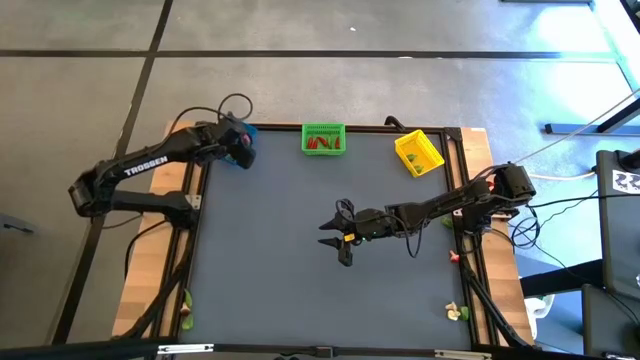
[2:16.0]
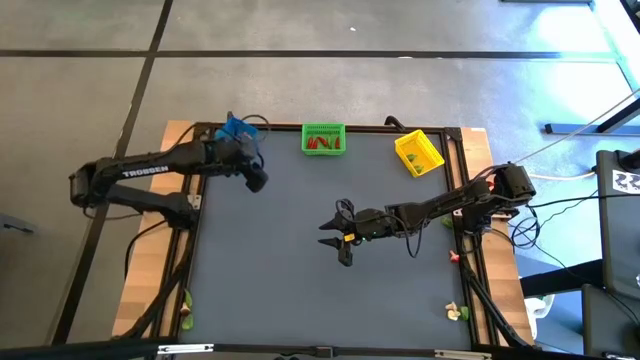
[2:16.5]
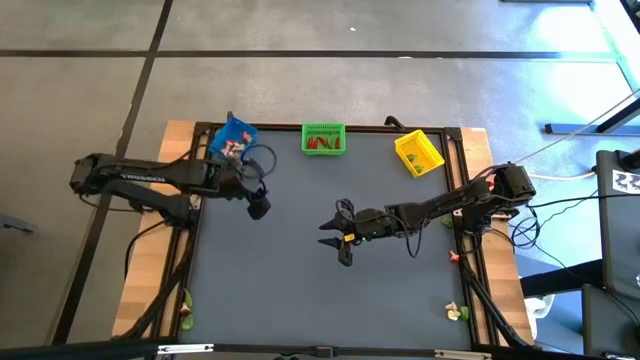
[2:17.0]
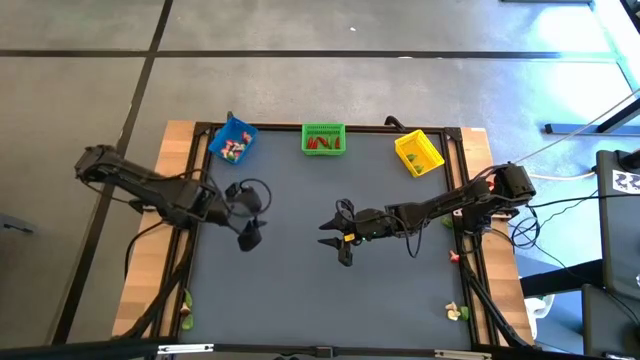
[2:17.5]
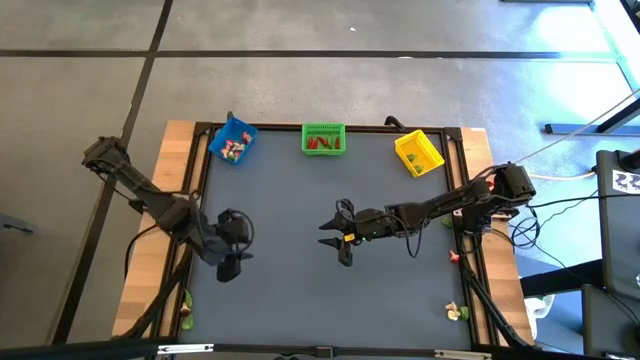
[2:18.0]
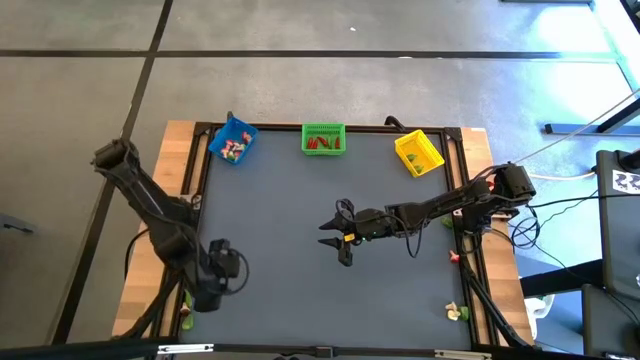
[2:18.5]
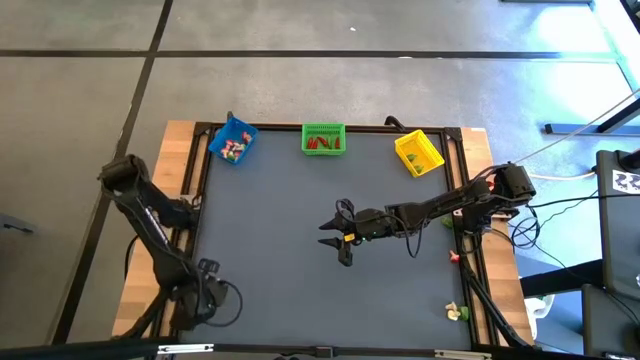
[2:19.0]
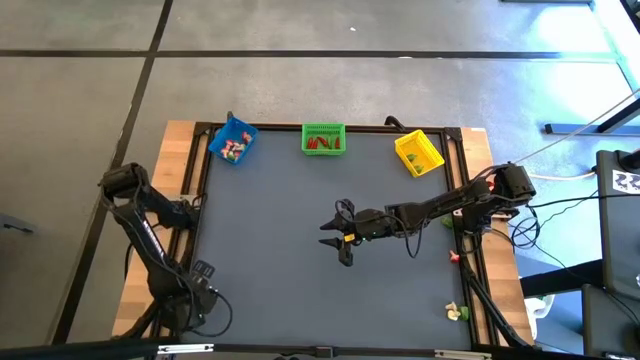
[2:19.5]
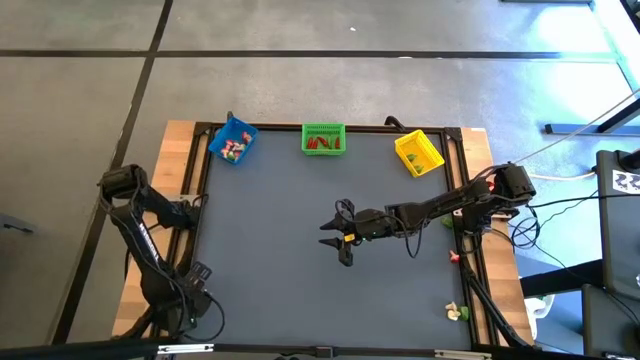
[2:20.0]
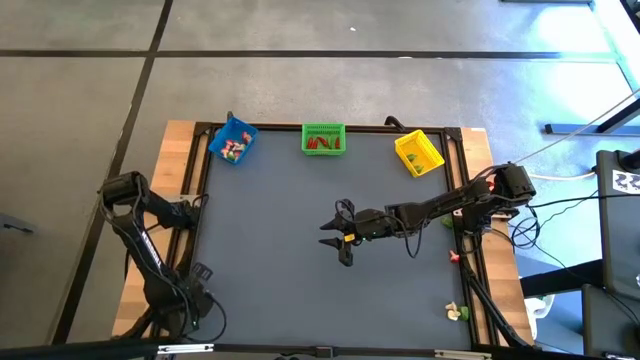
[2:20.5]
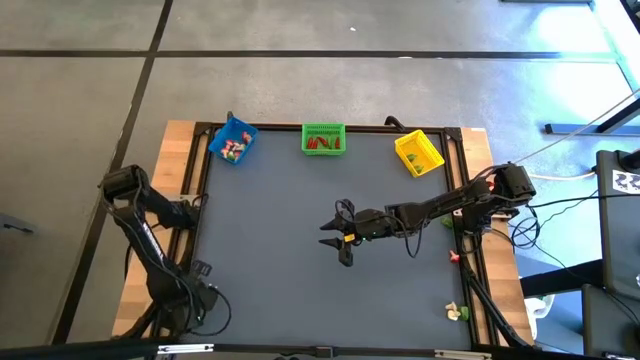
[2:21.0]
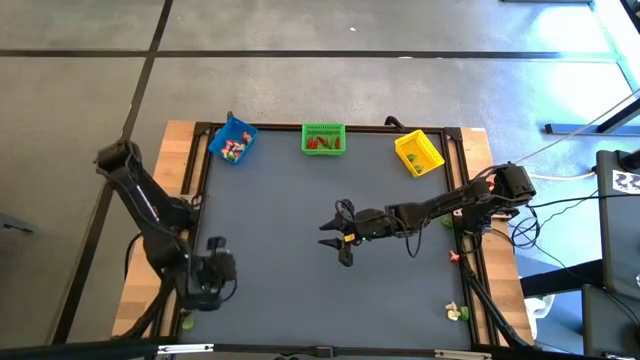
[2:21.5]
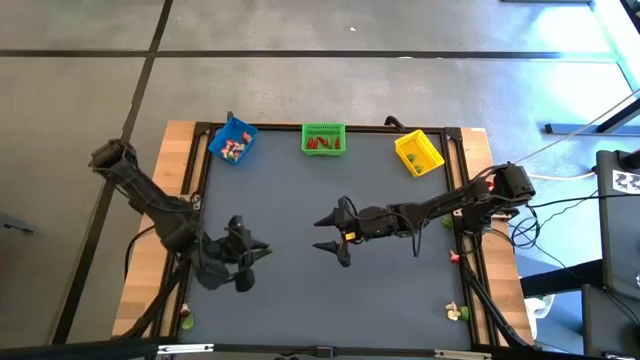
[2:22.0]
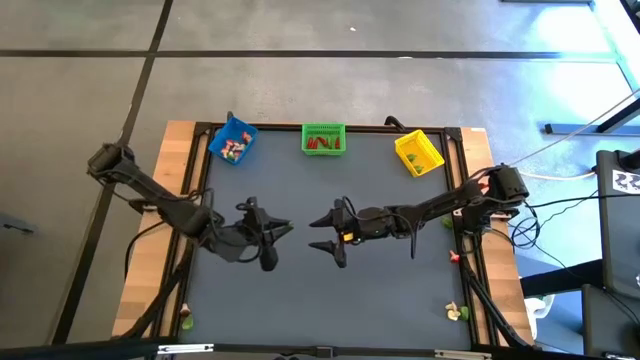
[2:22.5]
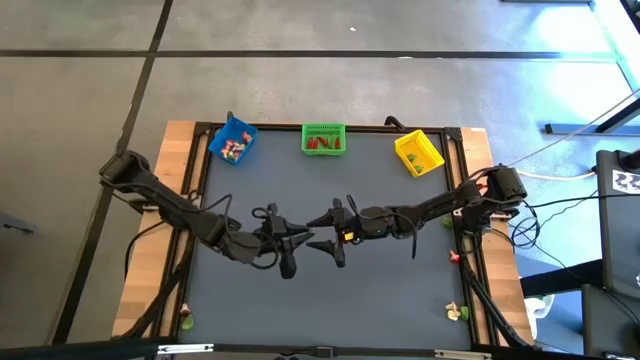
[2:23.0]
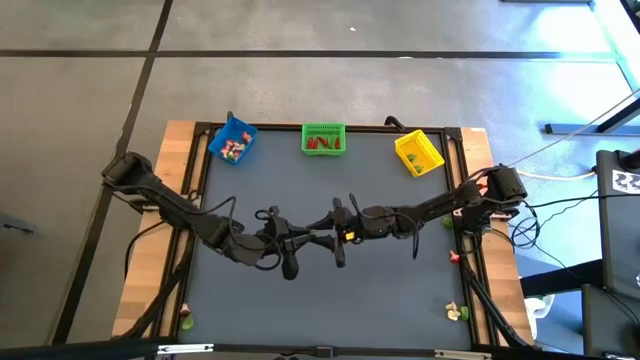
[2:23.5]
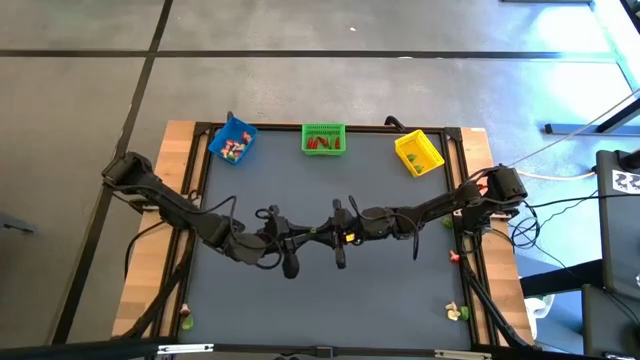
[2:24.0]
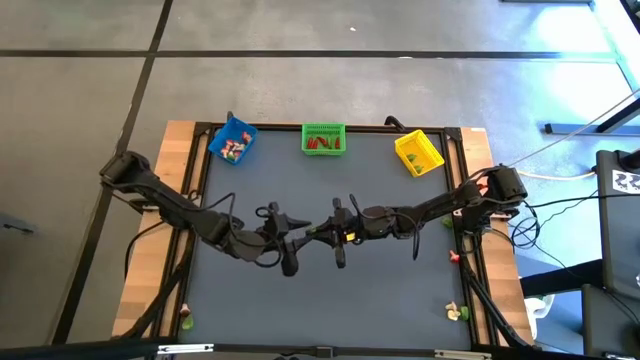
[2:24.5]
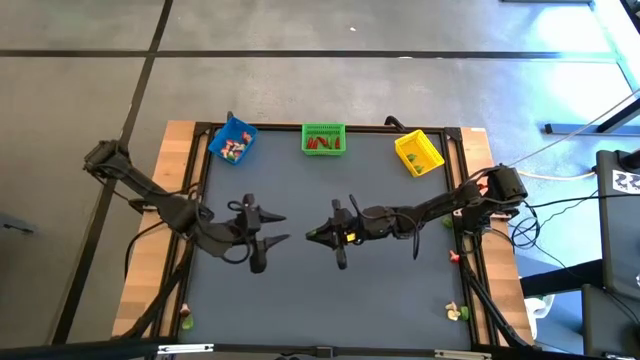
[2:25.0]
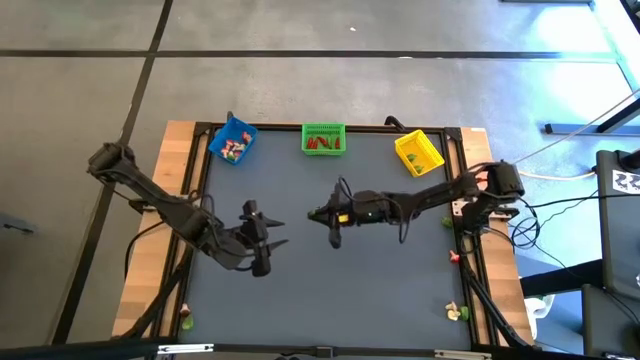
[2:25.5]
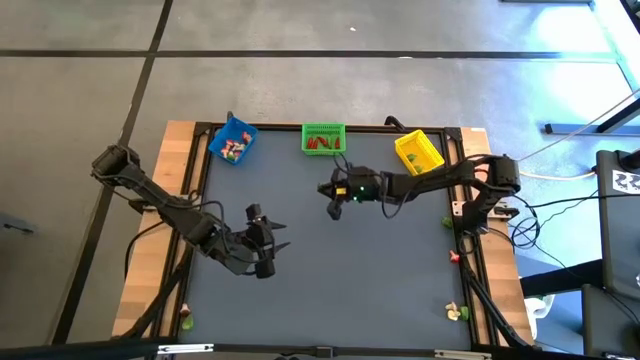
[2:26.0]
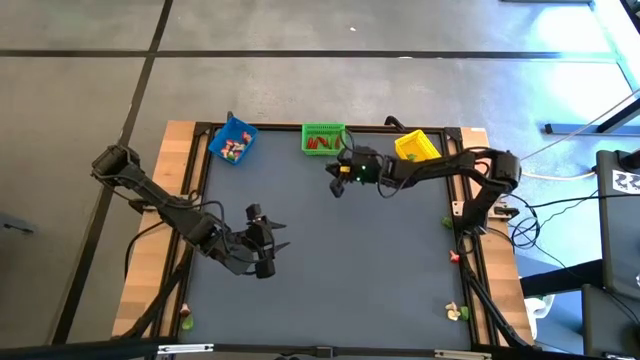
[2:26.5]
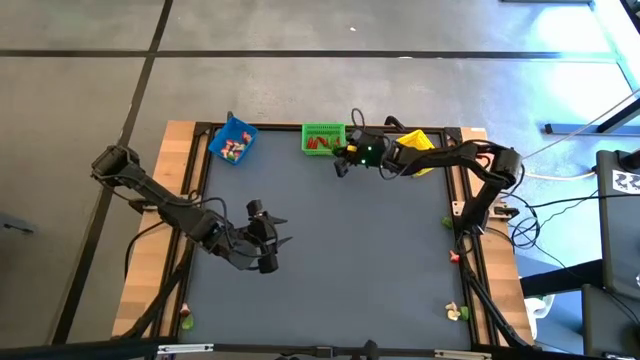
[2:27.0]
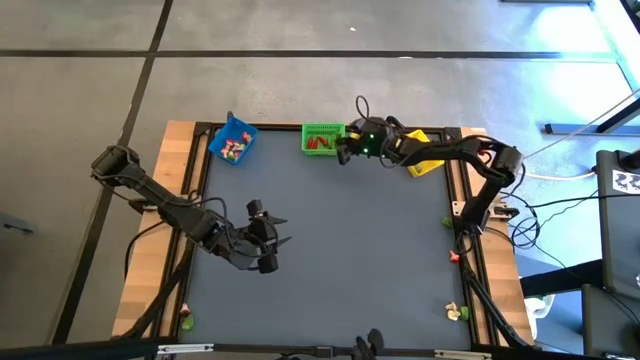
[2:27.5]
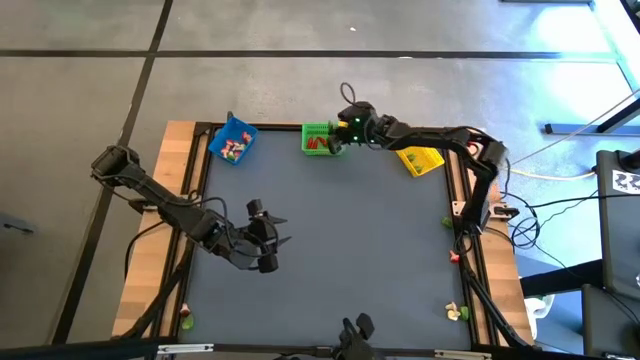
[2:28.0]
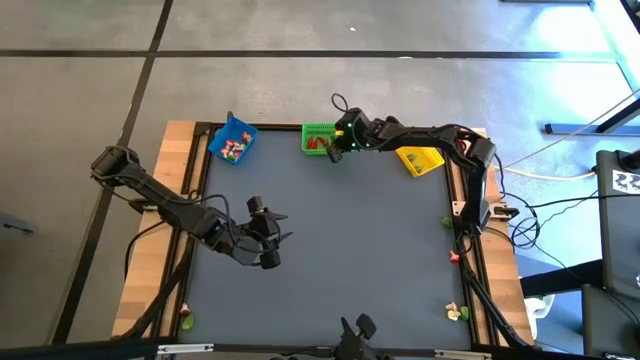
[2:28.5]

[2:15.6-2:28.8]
Task: Sort produce into baskets
Put the green chili pepper into the green bin

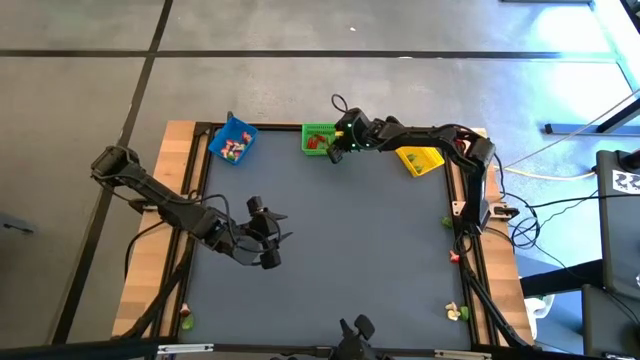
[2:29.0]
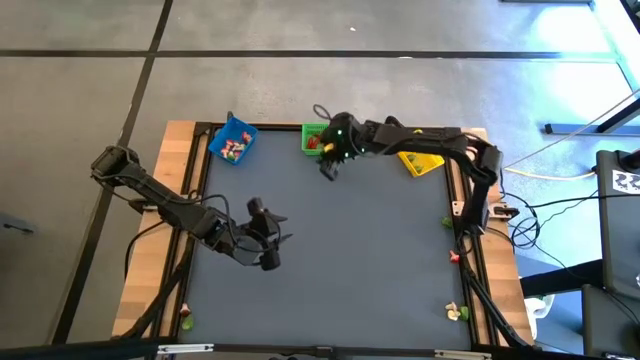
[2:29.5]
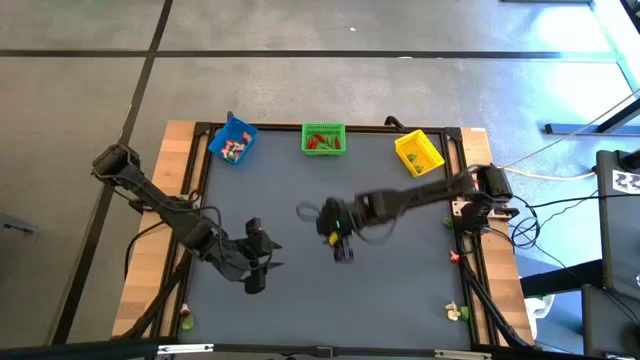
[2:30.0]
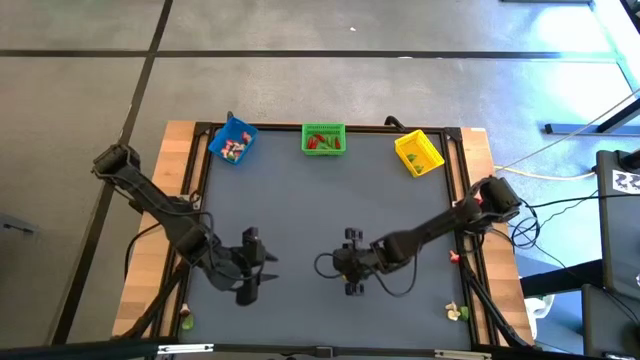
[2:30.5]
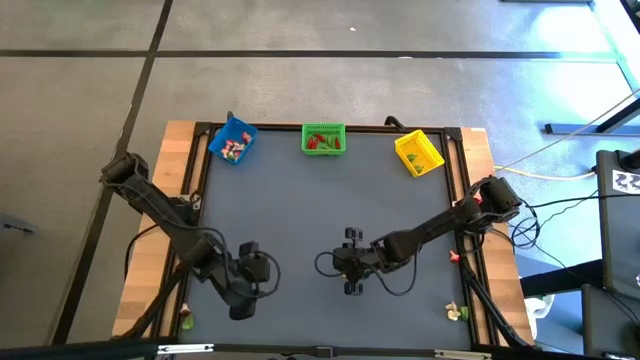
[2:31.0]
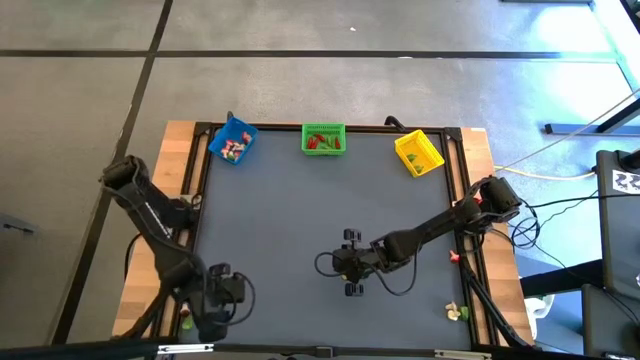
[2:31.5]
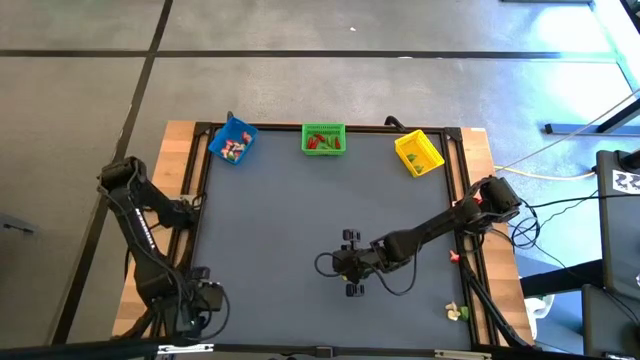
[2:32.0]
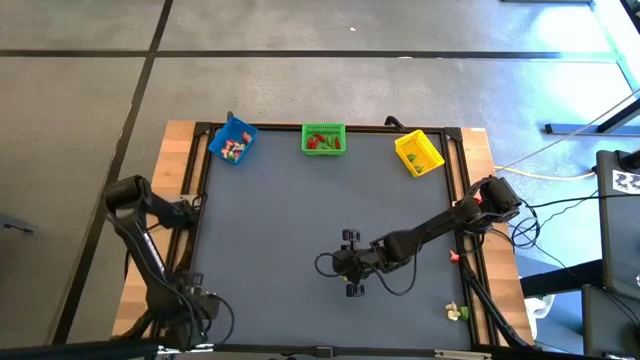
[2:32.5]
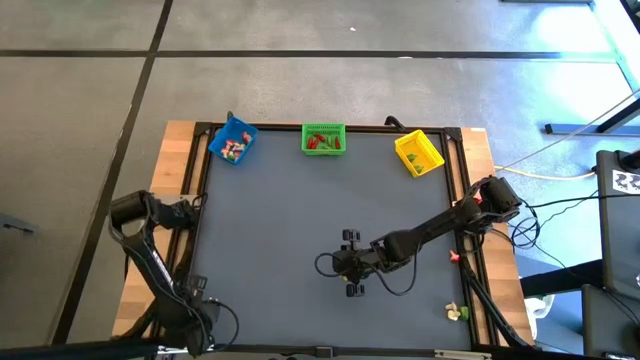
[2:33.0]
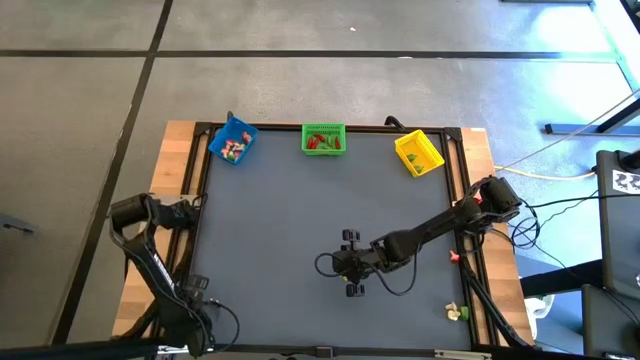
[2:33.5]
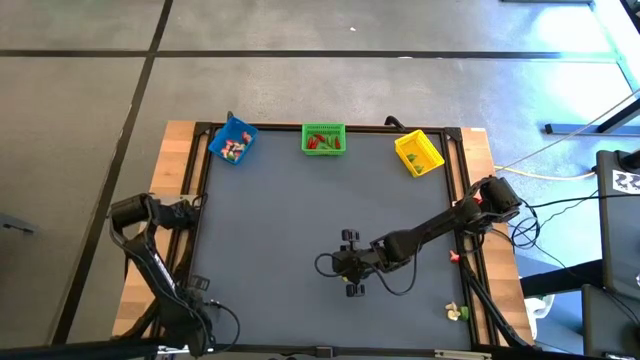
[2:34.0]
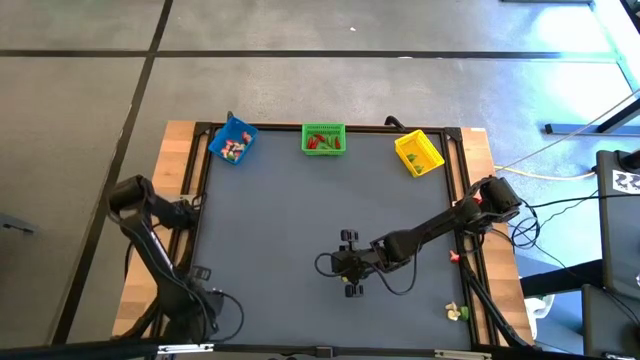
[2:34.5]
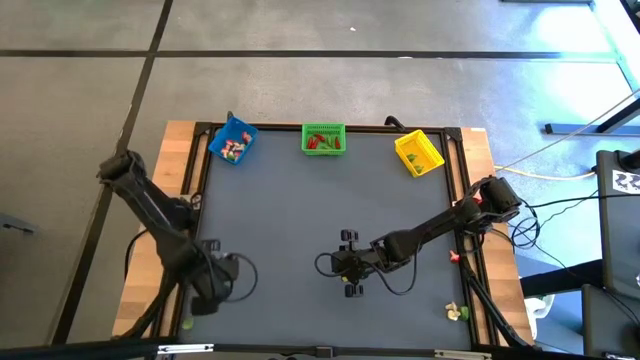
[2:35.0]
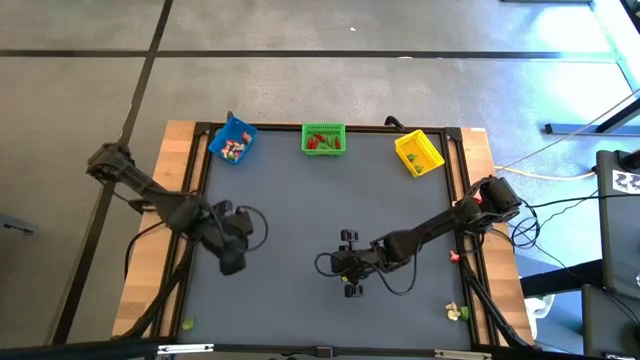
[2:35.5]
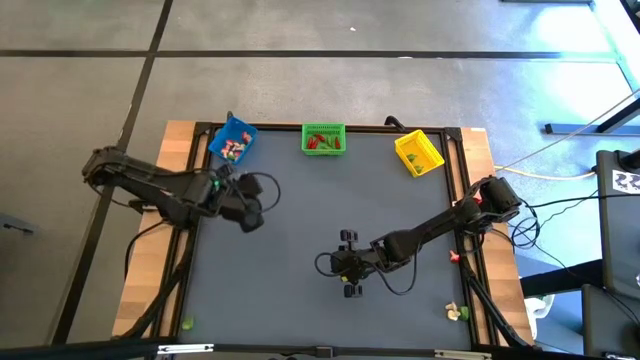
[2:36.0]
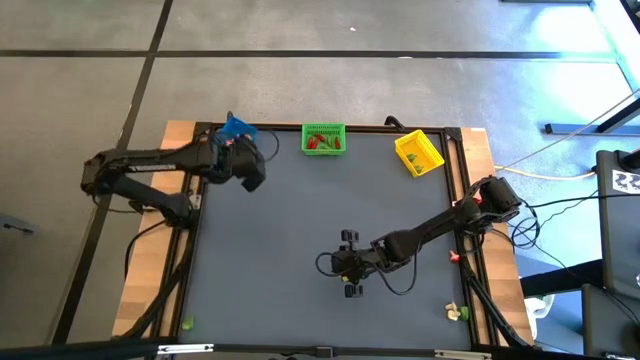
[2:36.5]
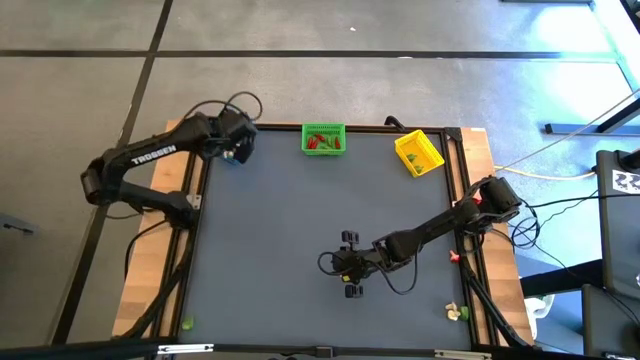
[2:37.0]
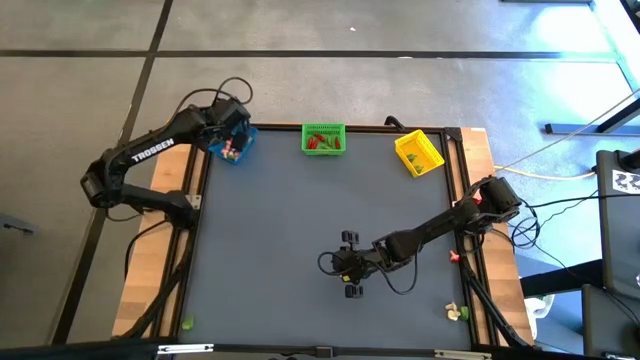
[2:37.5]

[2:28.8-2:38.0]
Put the brown mushroom into the blue bin
